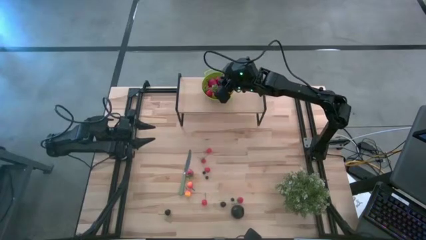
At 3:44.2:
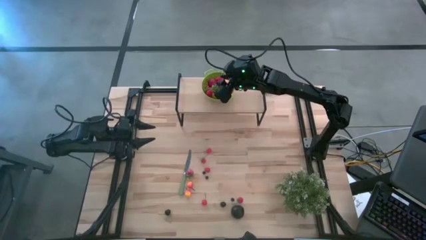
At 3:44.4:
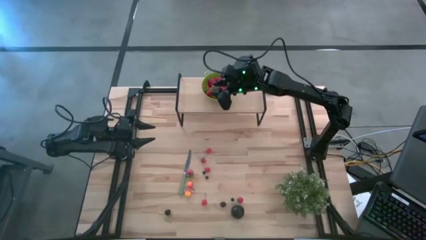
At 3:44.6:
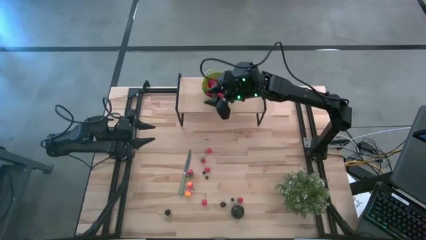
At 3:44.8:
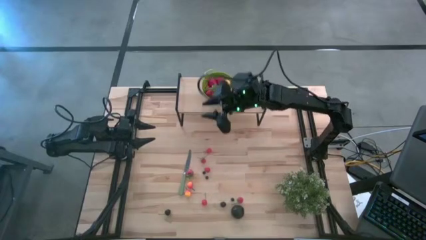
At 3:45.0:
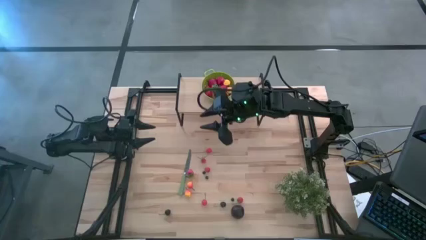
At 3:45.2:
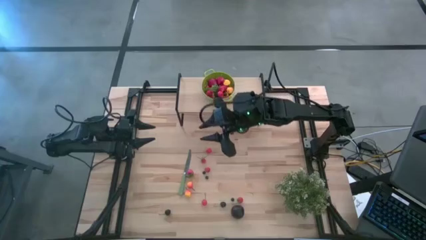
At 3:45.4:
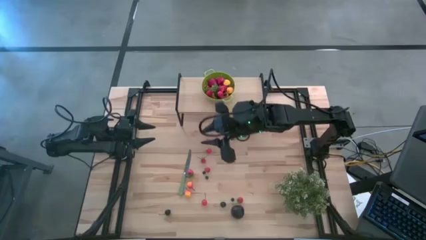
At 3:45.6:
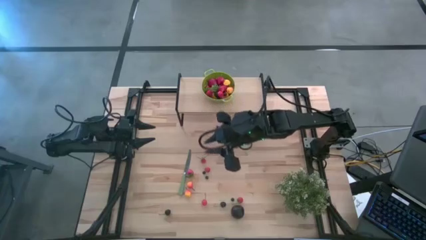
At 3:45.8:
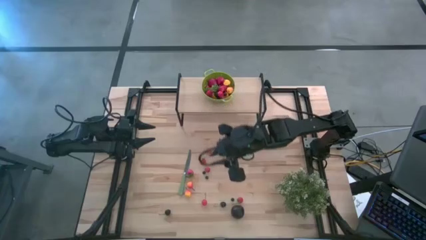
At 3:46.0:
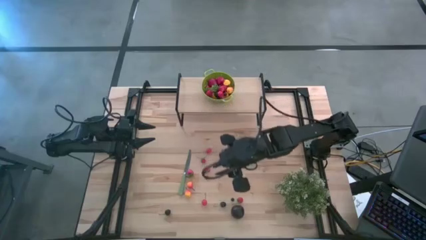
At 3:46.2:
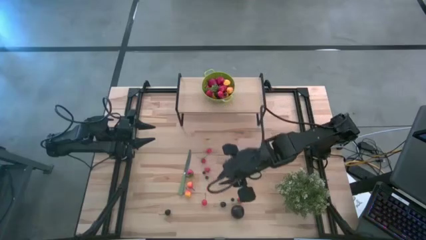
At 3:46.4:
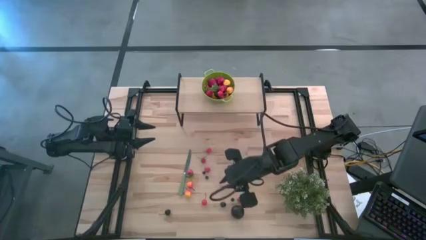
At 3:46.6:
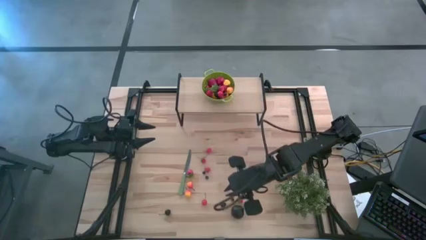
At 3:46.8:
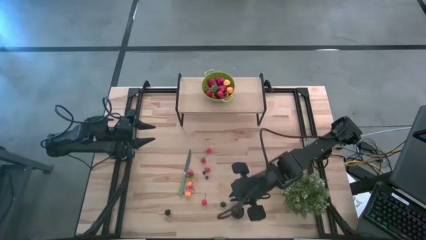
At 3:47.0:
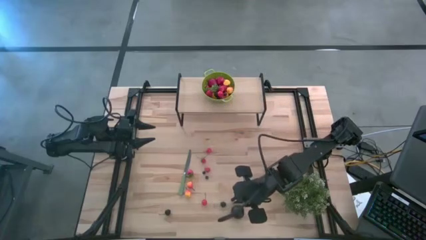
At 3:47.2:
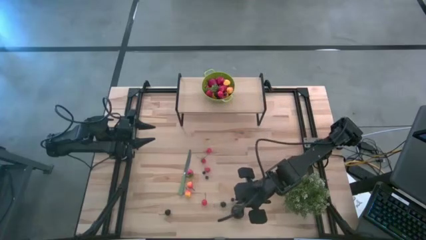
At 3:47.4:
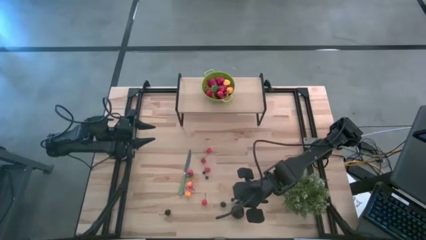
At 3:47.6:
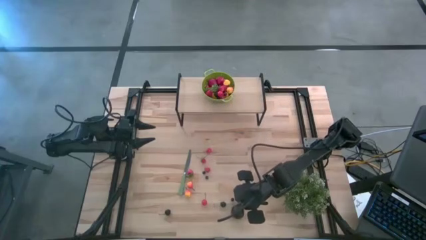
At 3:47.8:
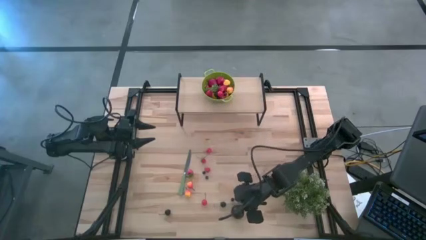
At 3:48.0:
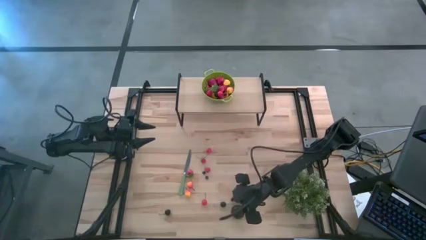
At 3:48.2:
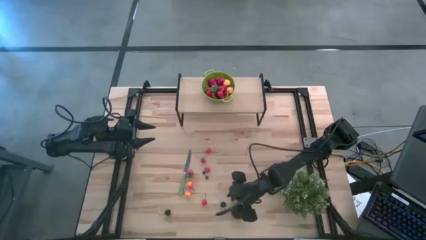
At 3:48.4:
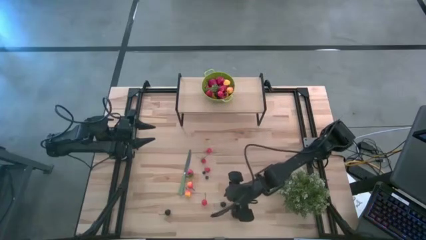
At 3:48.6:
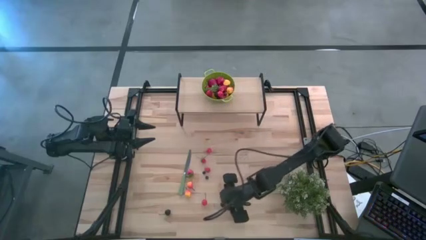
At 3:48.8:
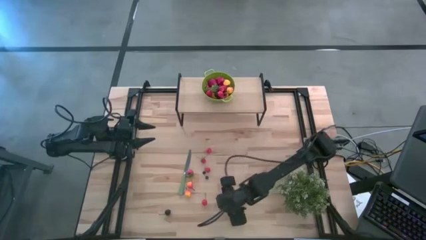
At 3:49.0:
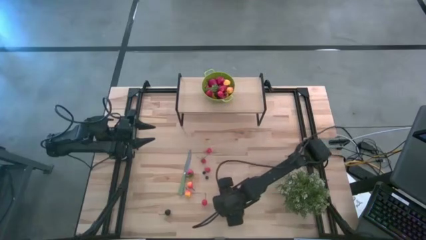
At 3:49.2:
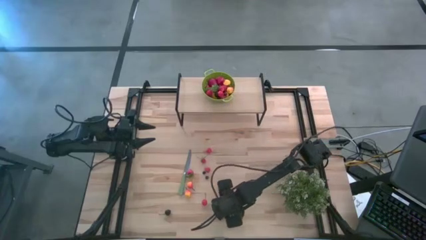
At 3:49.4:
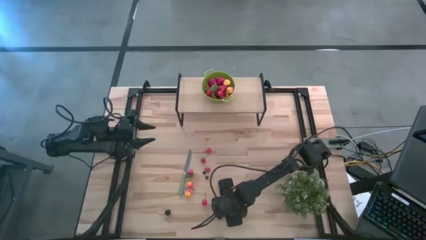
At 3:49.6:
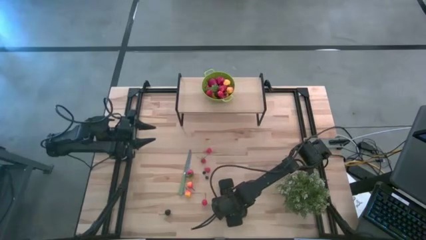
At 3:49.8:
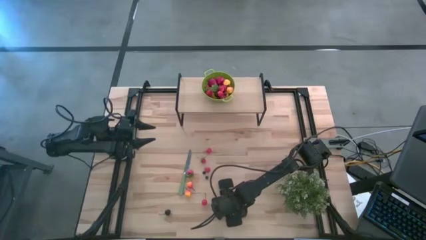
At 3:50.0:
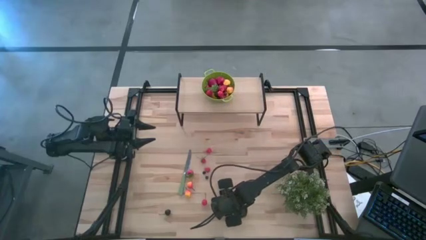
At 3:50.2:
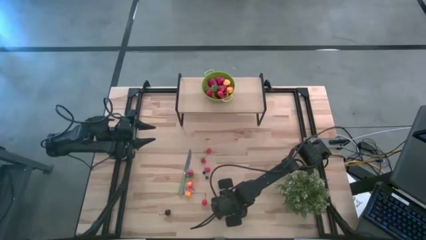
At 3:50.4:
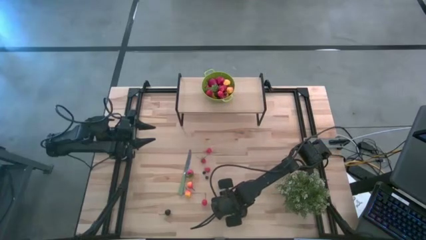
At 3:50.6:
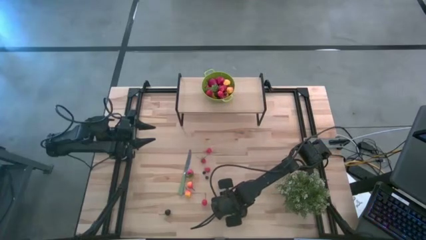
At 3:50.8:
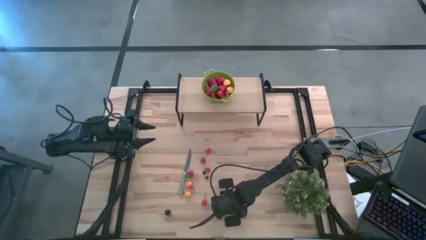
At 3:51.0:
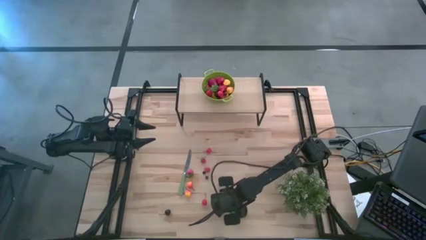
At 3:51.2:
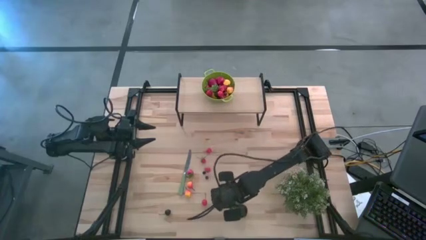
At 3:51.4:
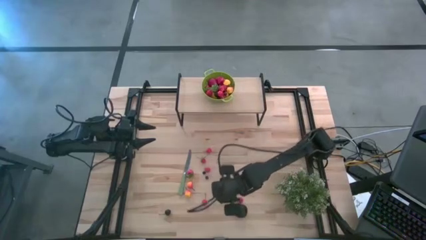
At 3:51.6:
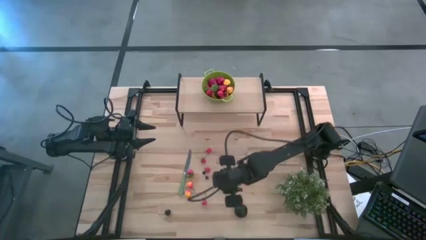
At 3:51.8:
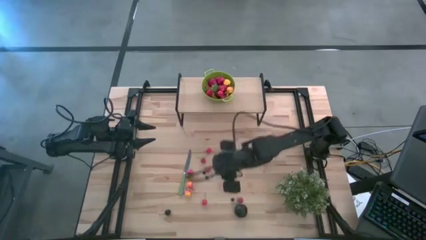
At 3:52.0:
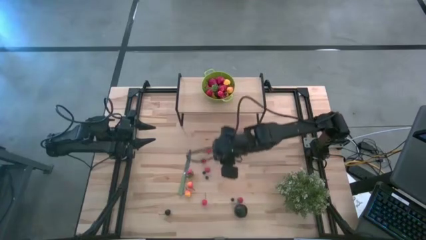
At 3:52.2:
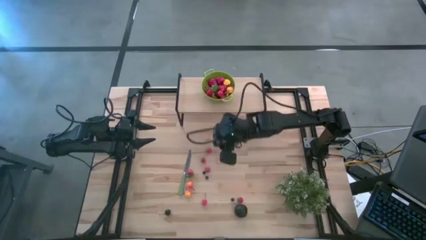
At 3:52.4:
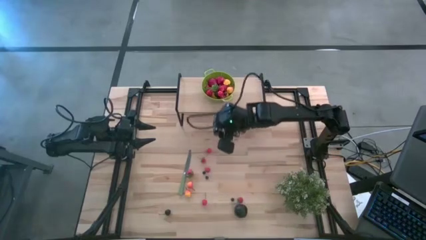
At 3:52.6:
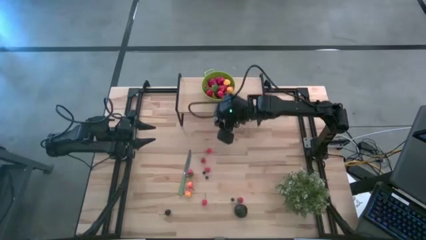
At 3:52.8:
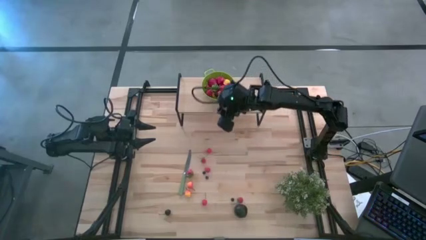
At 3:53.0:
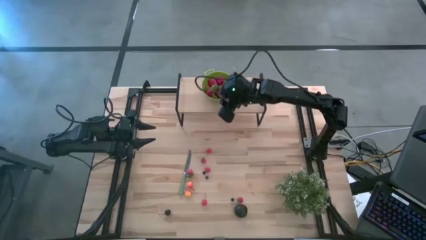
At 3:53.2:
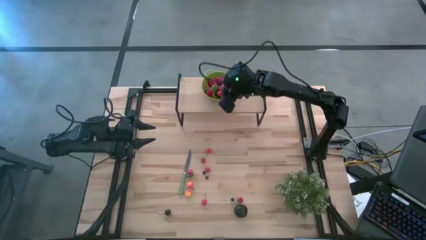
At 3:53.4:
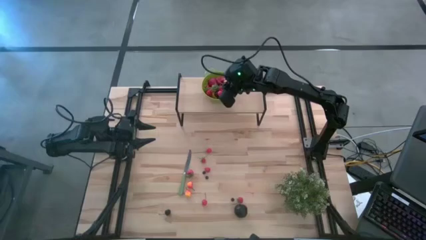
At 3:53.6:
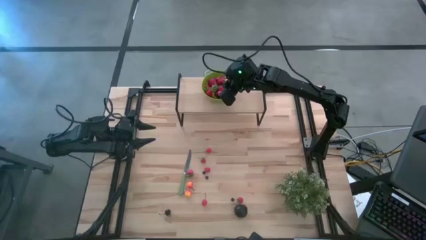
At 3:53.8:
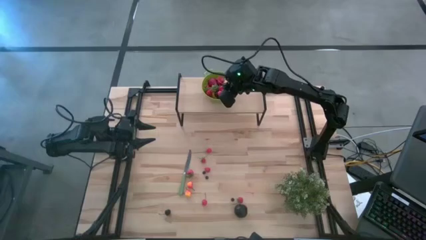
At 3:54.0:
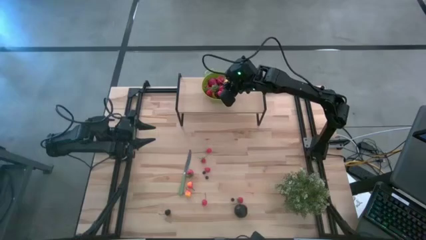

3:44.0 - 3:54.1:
Task: Pick & Place Fruit
Put the black cherry into the green colander on the shelf

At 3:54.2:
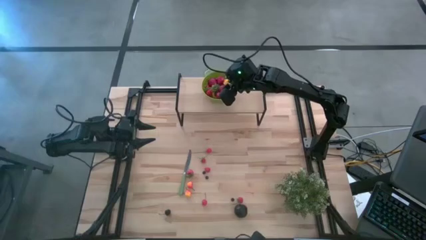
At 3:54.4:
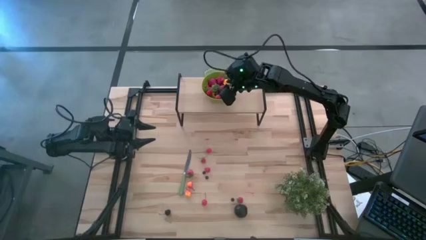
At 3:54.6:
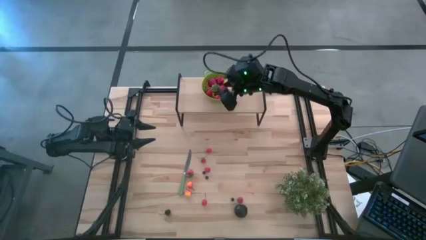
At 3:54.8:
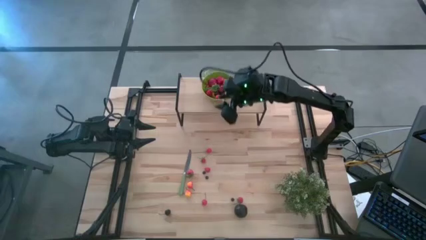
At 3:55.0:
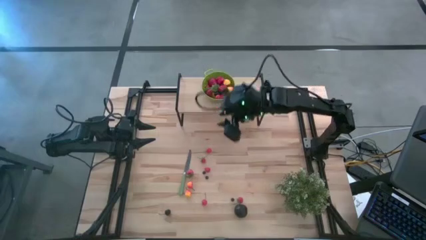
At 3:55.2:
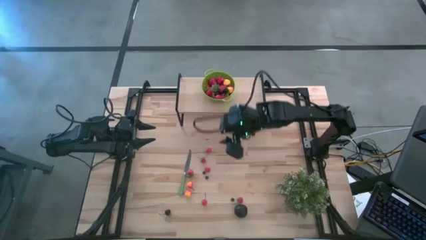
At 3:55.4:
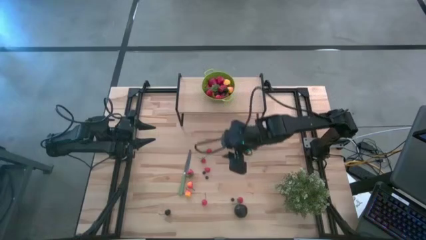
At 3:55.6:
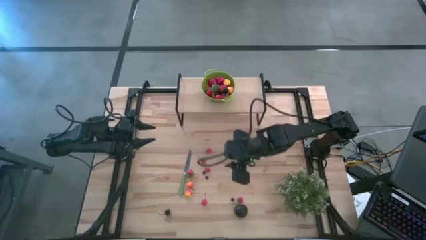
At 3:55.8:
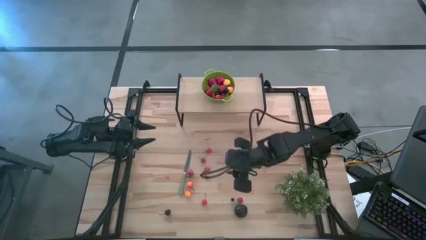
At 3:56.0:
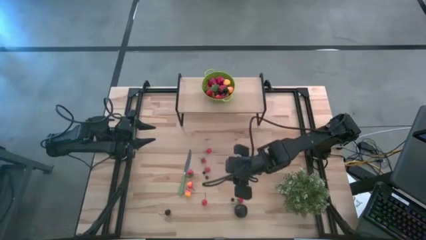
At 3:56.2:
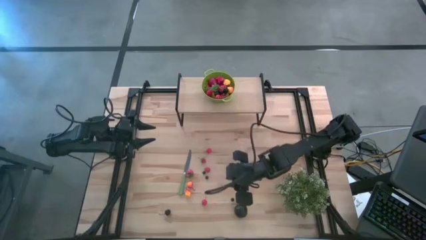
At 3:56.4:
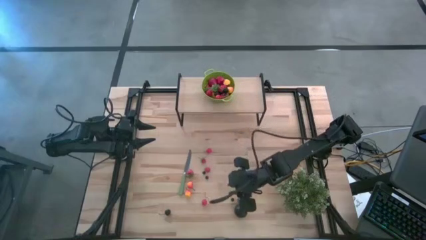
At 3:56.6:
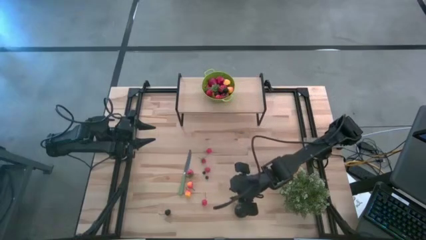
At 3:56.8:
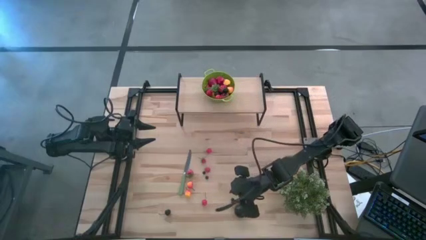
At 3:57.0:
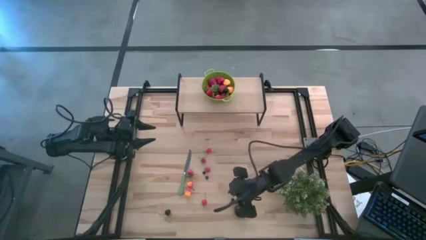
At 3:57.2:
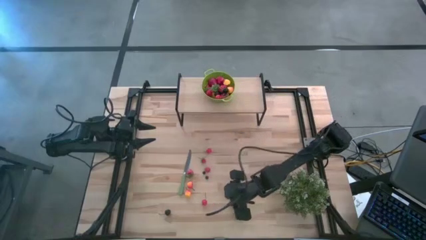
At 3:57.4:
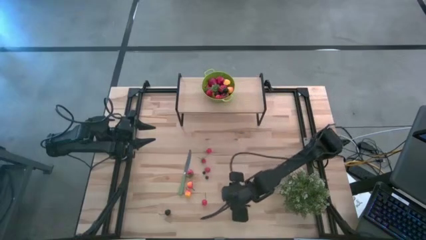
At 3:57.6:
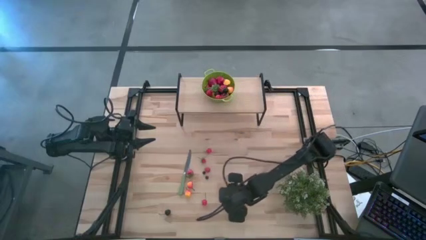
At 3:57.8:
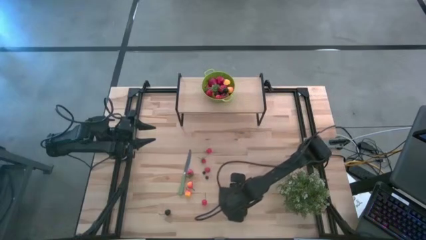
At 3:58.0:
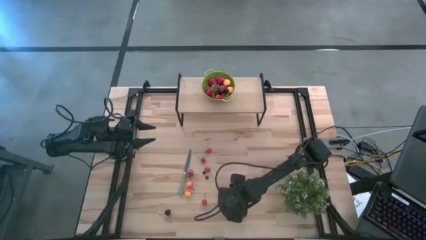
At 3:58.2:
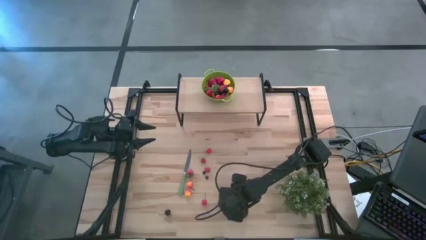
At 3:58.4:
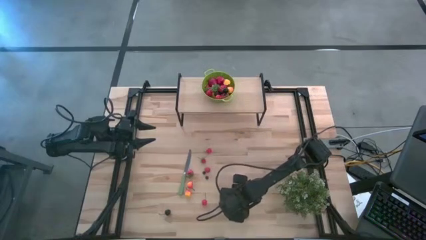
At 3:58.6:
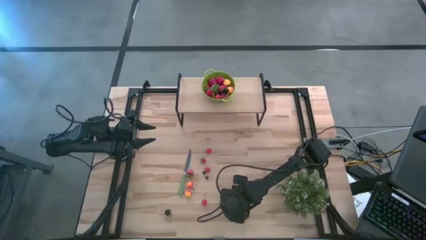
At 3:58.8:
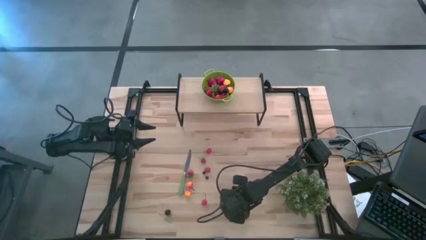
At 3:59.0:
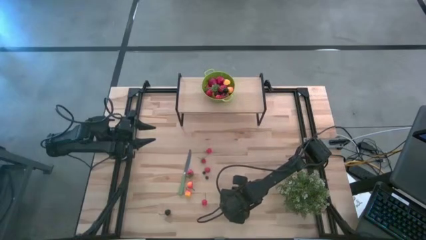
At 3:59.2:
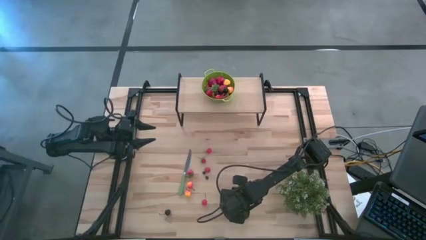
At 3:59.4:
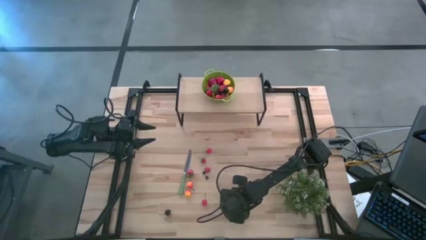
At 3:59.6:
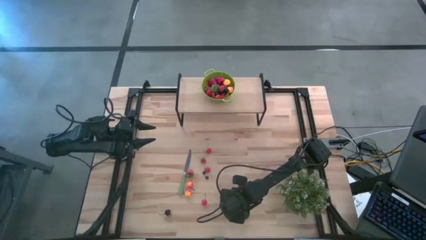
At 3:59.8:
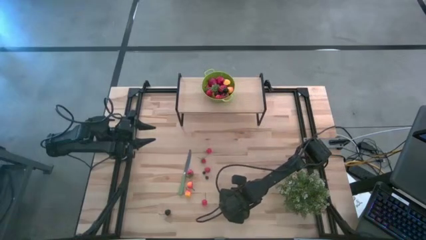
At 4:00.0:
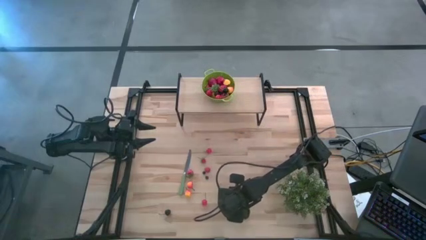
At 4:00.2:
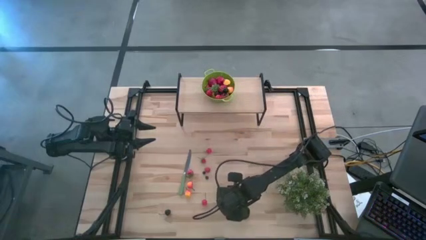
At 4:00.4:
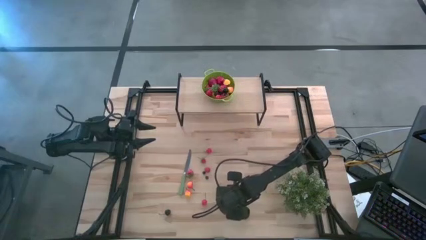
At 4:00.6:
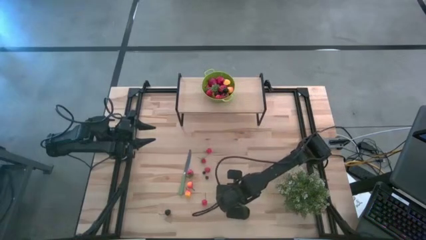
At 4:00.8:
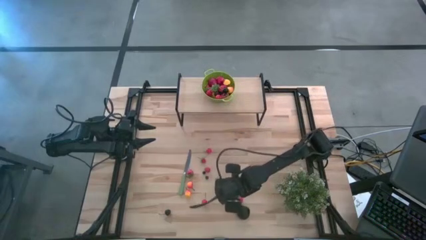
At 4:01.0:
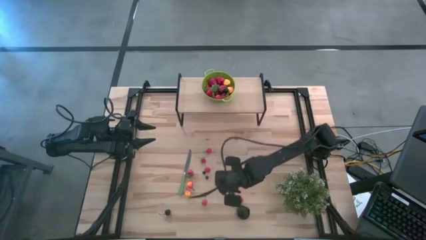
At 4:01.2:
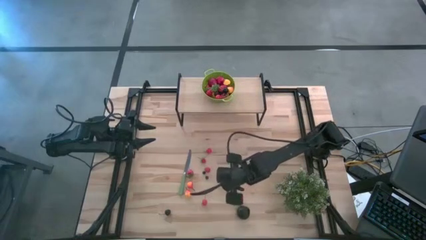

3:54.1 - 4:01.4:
Put the blueberry into the green colander on the shelf
